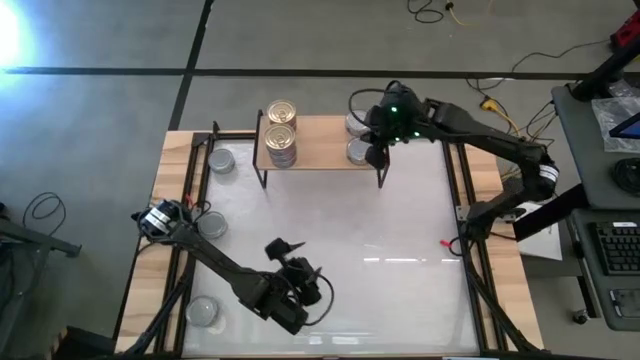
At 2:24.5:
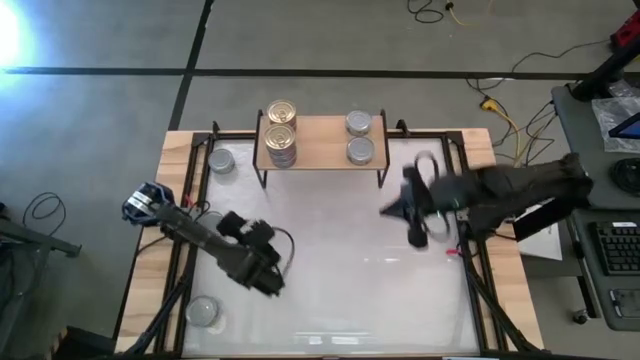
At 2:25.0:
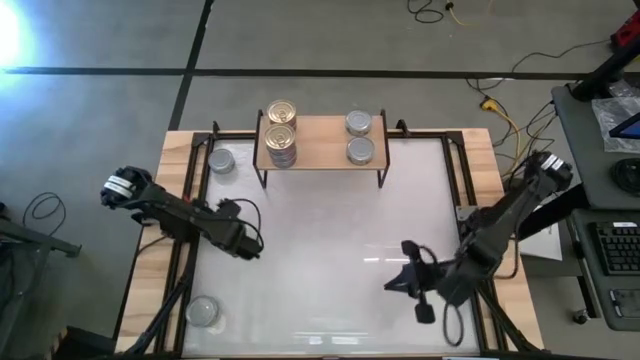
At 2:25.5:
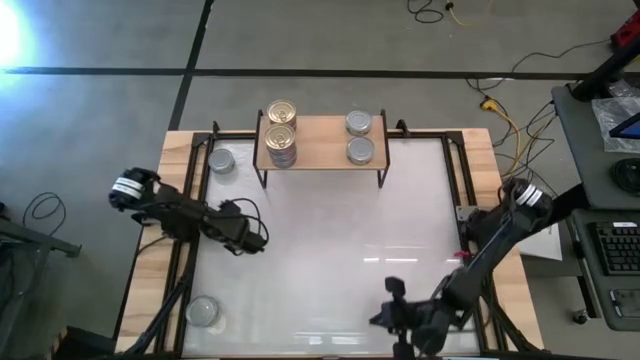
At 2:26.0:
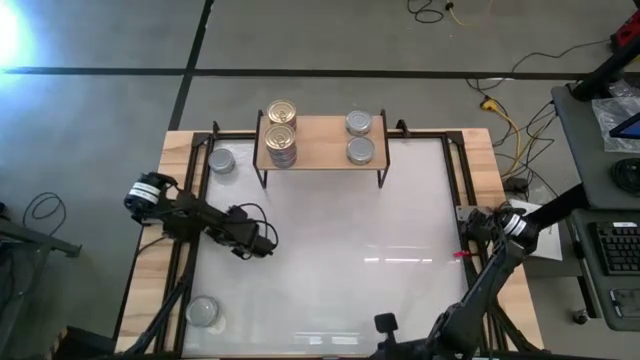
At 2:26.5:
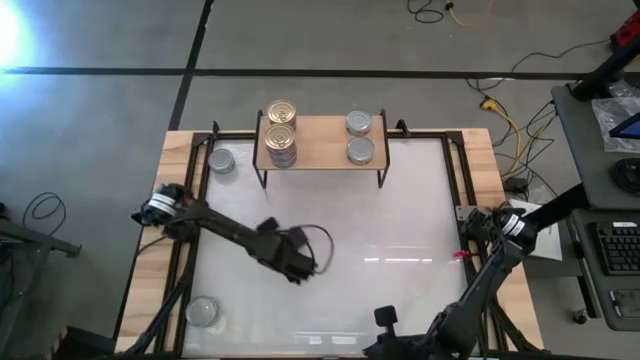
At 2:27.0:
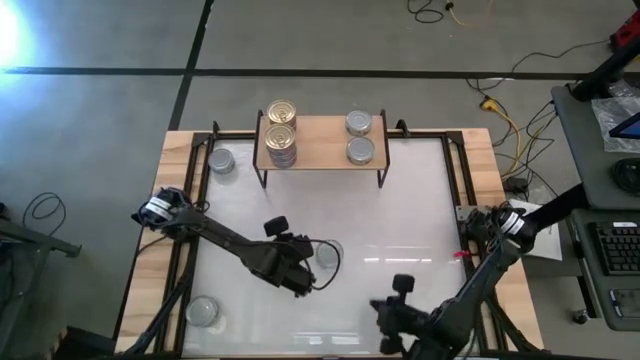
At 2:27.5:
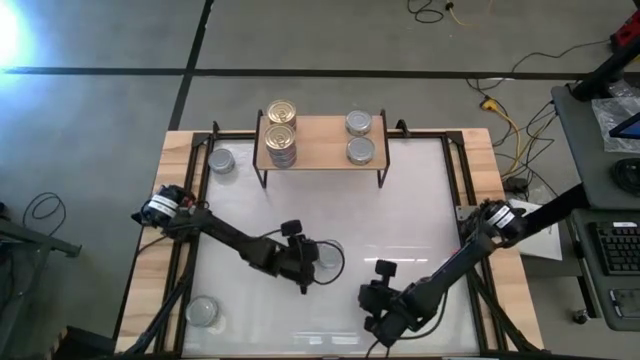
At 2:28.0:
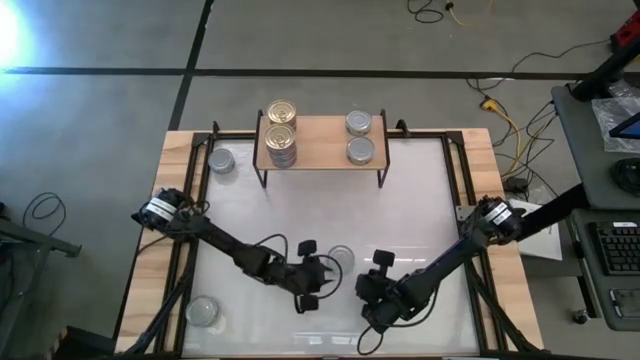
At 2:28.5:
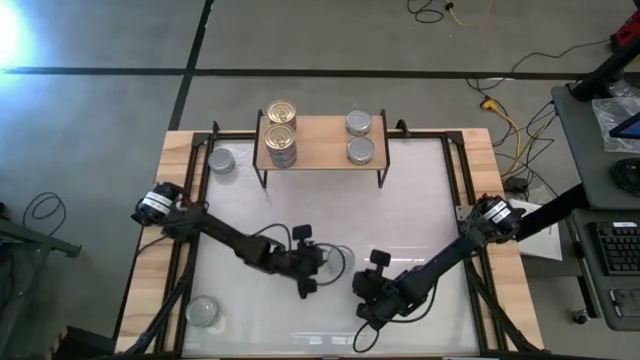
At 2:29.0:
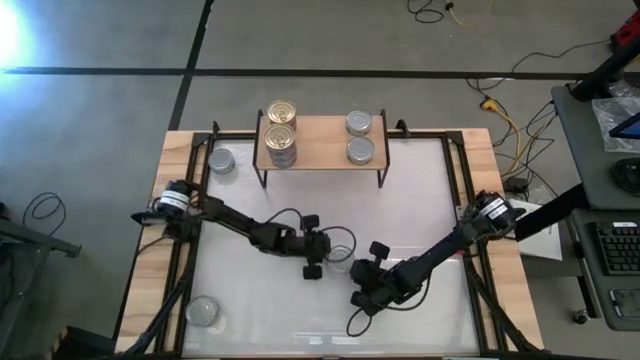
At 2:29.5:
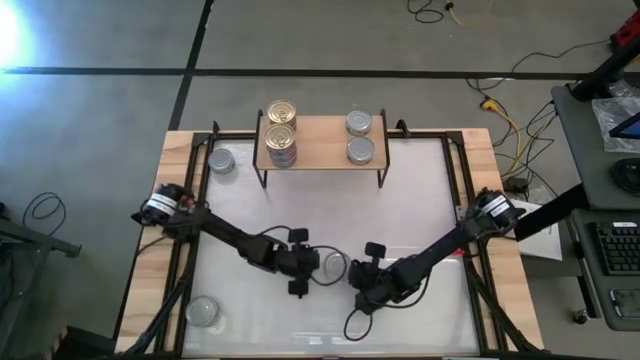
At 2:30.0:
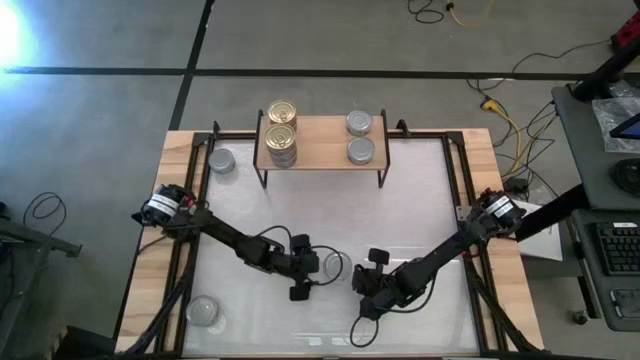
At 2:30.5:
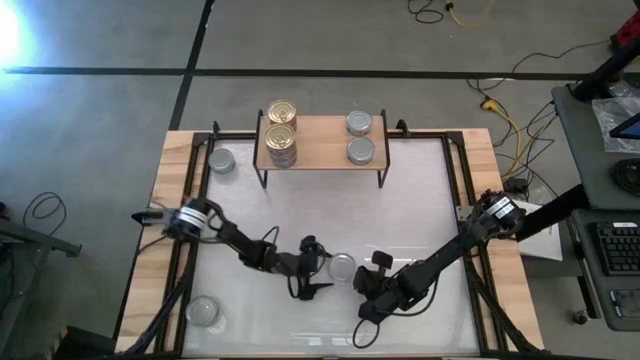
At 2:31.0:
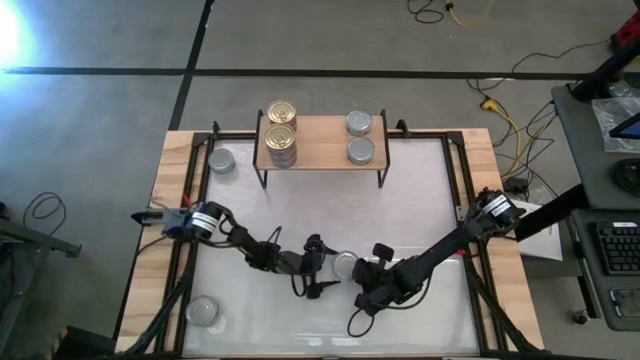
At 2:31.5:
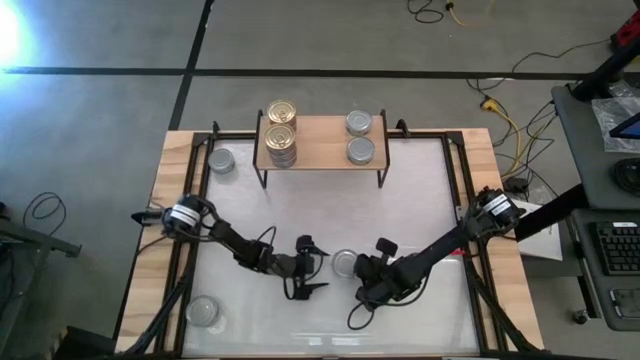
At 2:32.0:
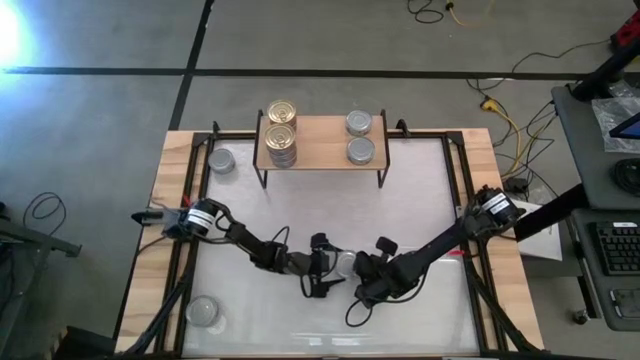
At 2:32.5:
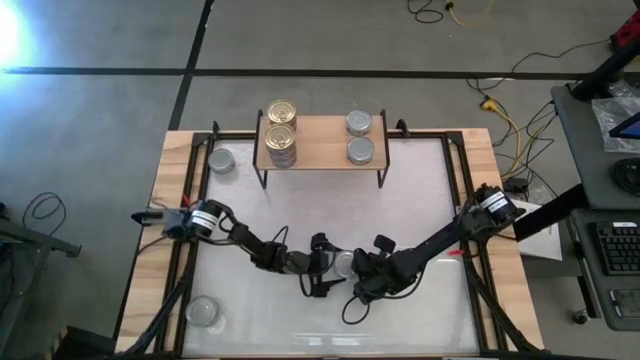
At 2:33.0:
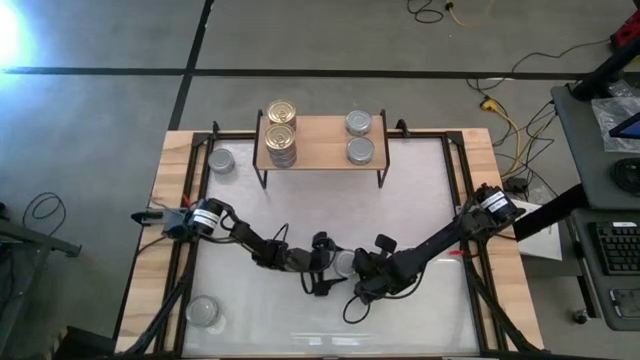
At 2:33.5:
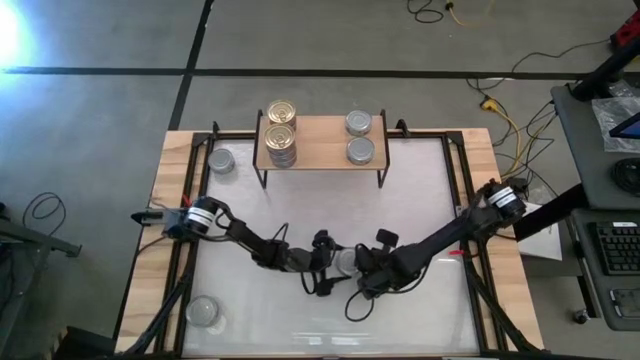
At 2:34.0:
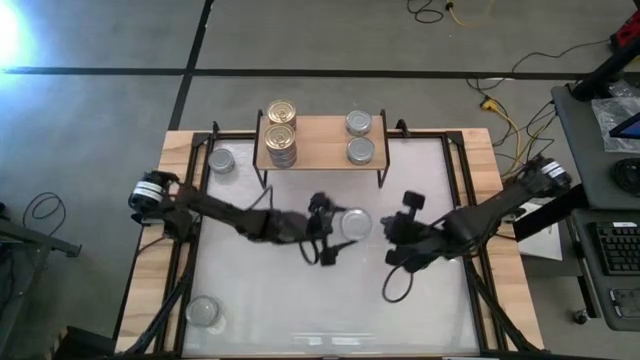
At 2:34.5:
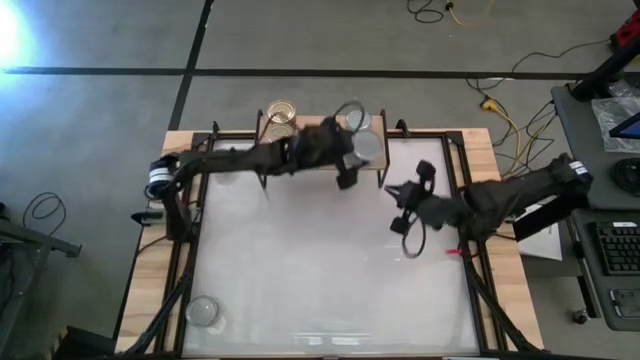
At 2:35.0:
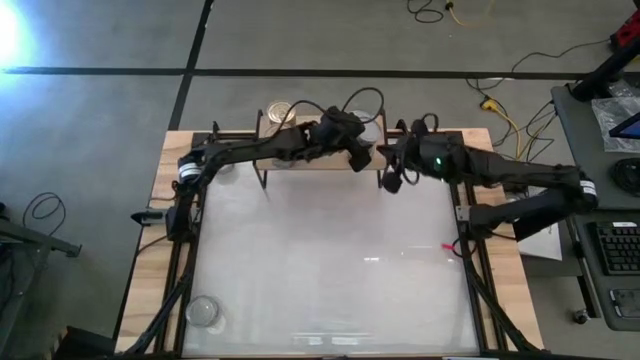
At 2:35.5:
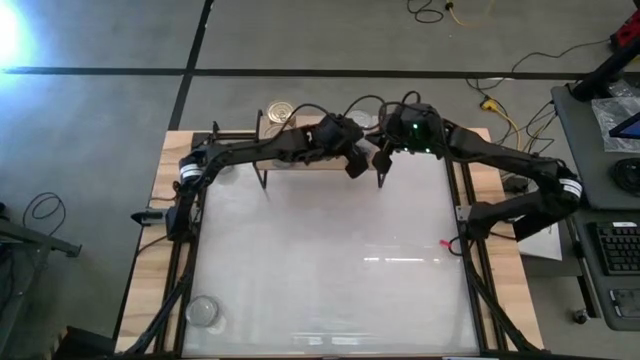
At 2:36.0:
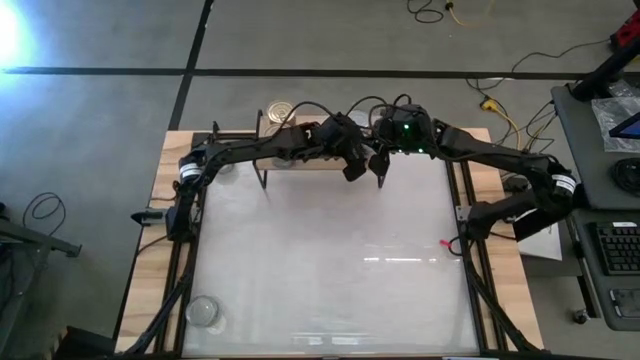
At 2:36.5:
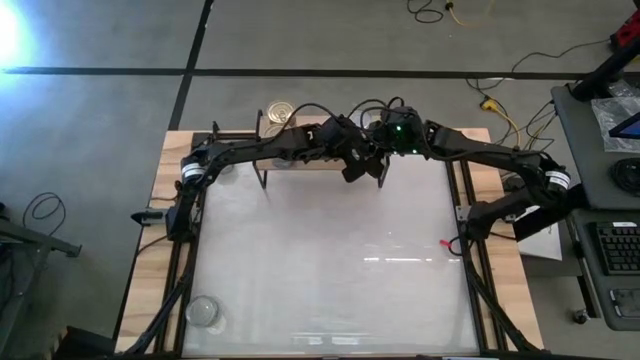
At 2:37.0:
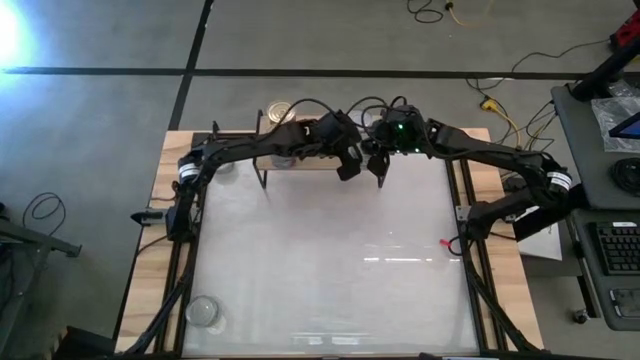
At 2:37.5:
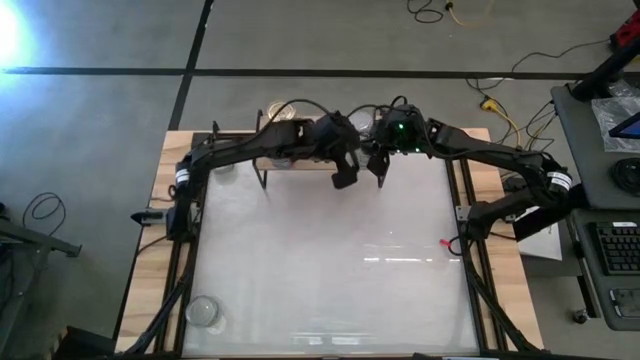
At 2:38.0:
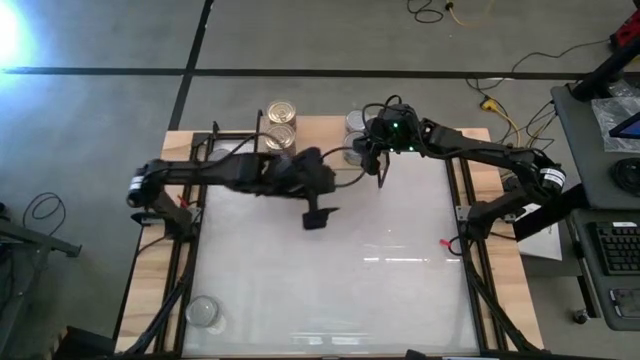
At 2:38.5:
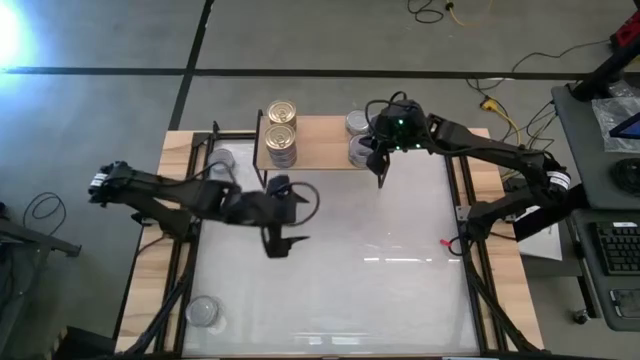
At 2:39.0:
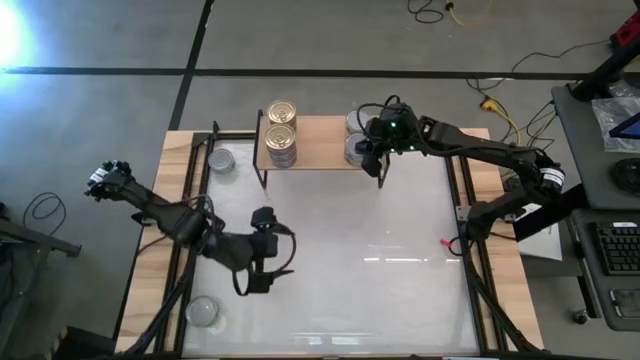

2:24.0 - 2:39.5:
Task: Stack canned seafood by type on shelf
Stack the green tuna can on top of the other green tuna on the shelf

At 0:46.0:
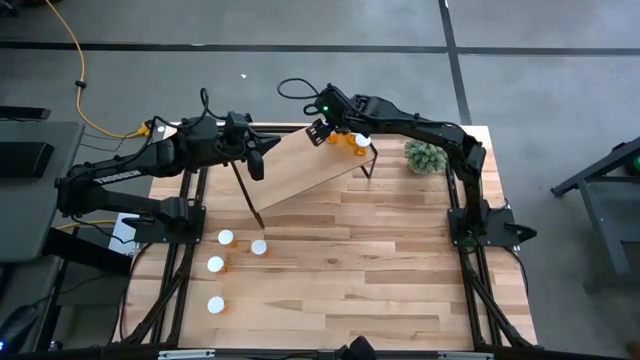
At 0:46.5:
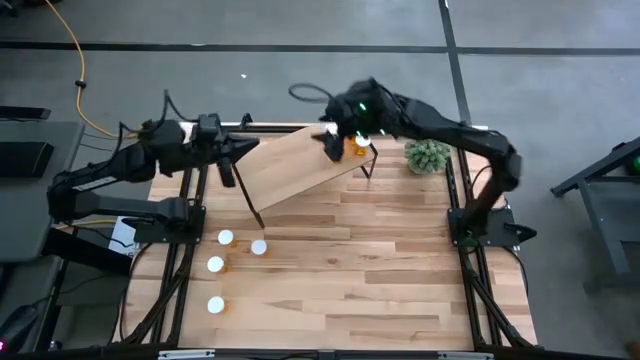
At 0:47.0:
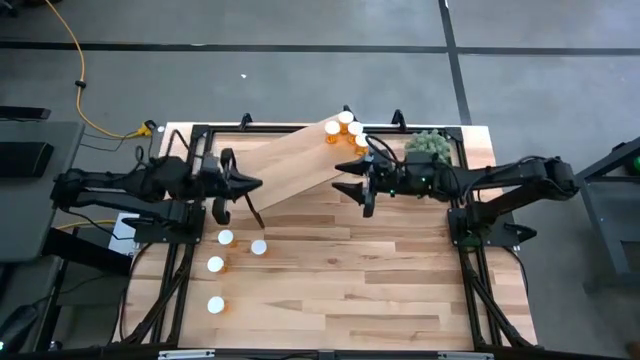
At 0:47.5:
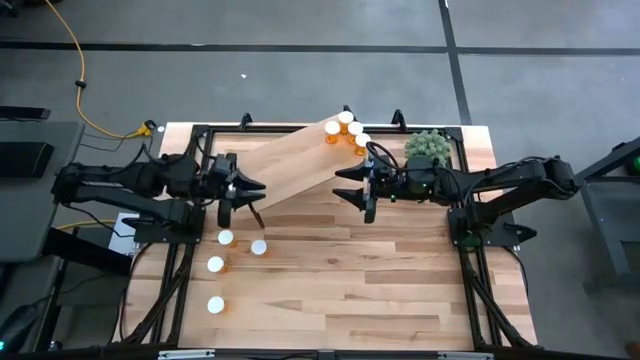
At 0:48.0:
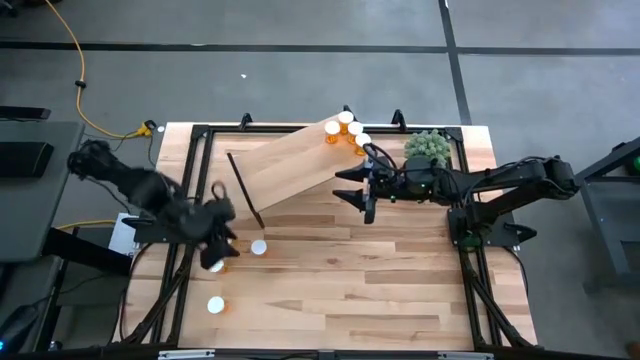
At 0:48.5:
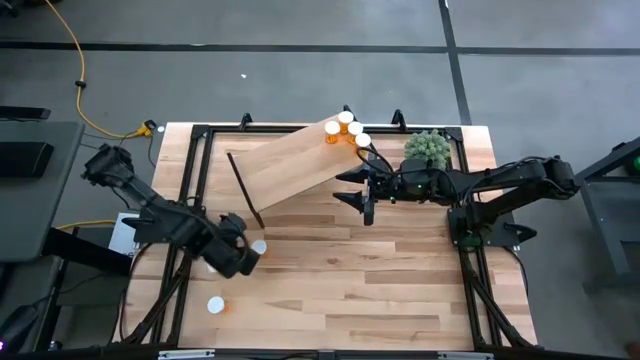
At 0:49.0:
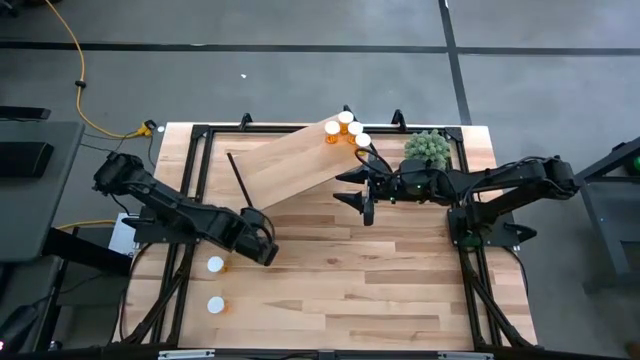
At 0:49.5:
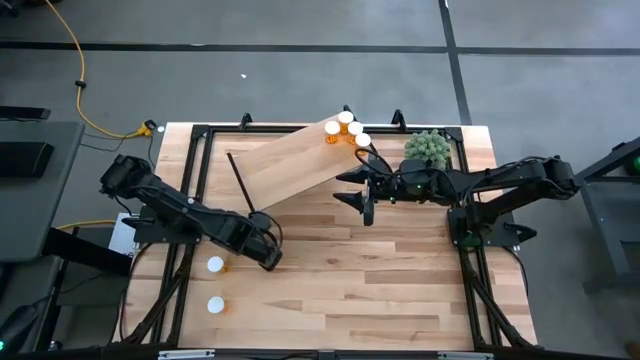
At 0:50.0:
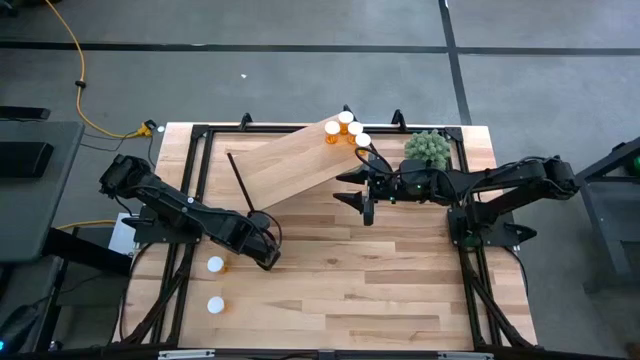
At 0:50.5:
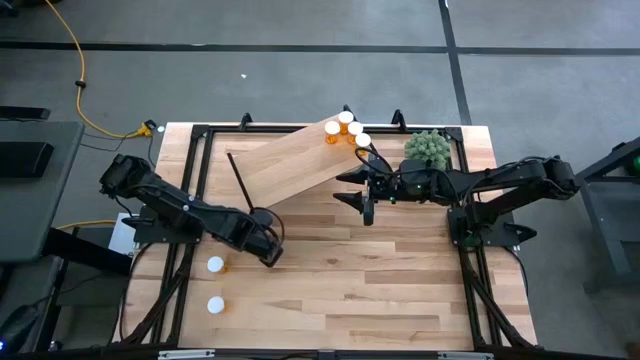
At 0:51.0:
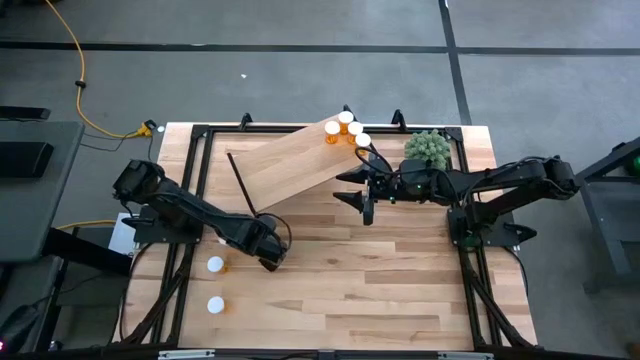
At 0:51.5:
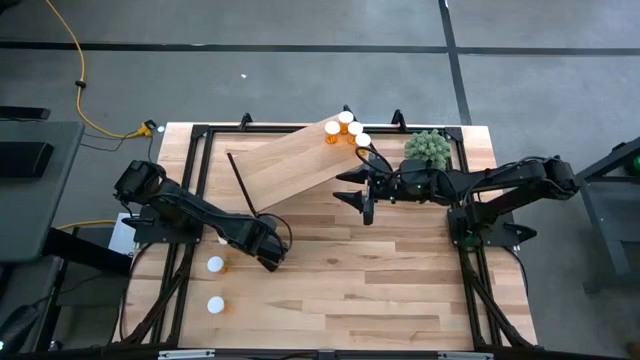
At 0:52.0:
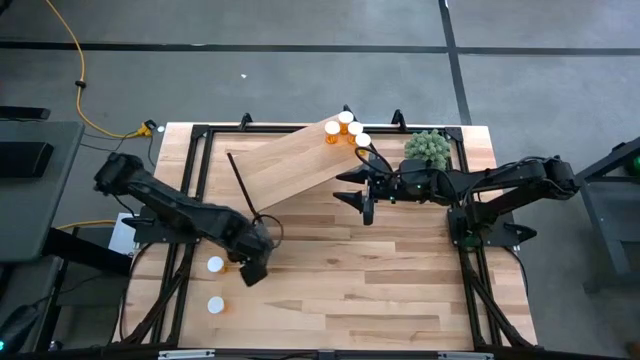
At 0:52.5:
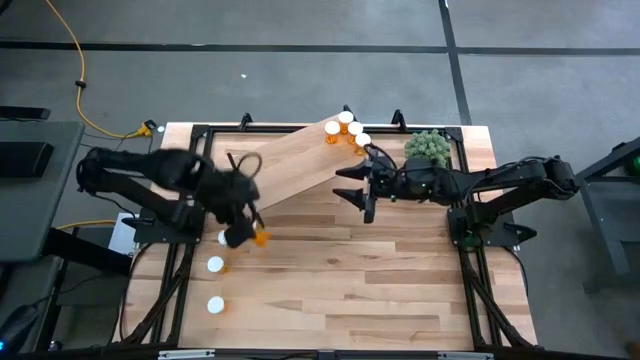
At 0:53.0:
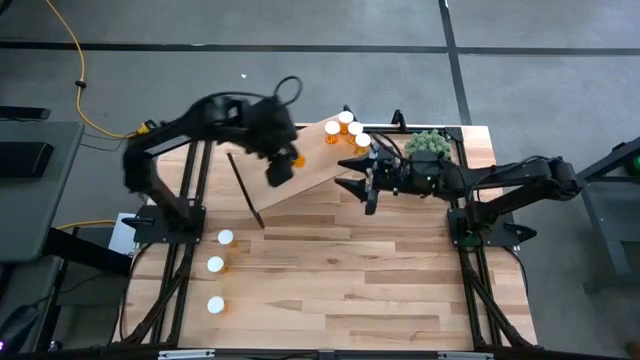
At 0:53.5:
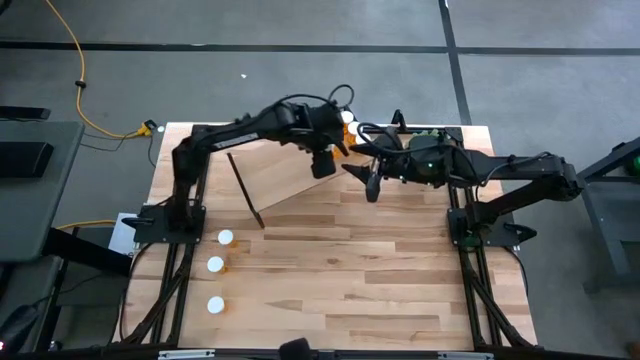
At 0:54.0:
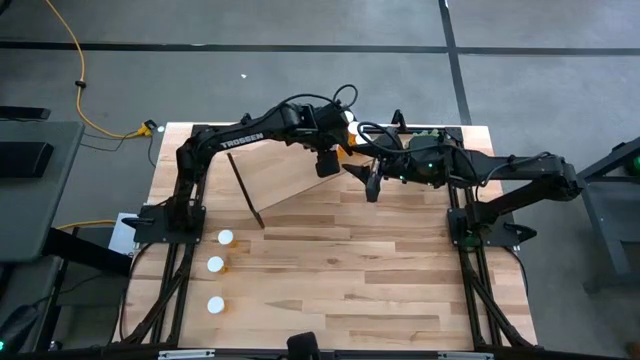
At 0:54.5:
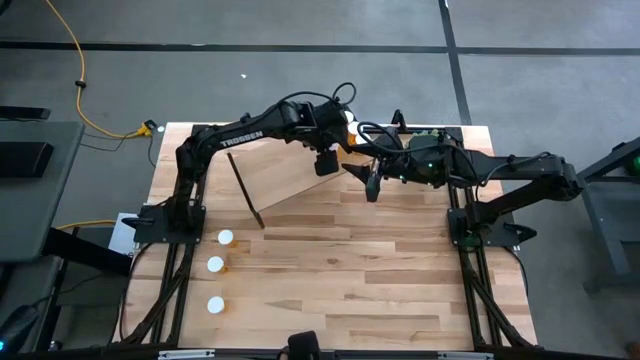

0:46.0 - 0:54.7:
Task: Pick and place medicine bottles onto shelf by color
Put the pill bottle on the shelf aligned with the other pill bottles
